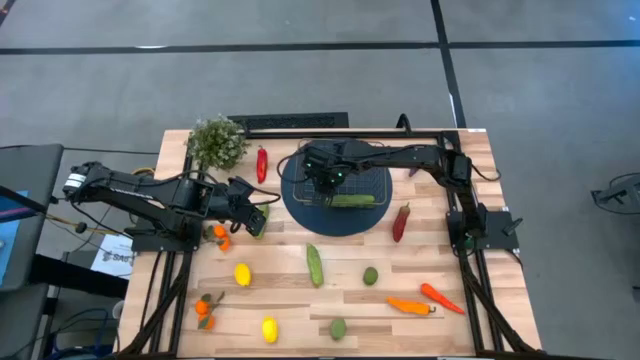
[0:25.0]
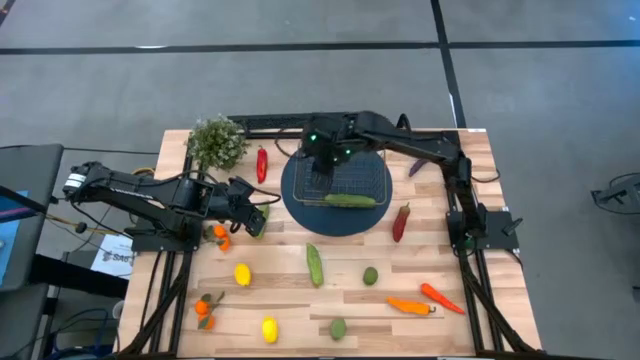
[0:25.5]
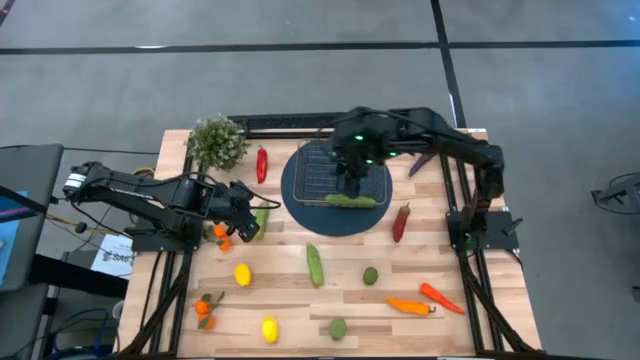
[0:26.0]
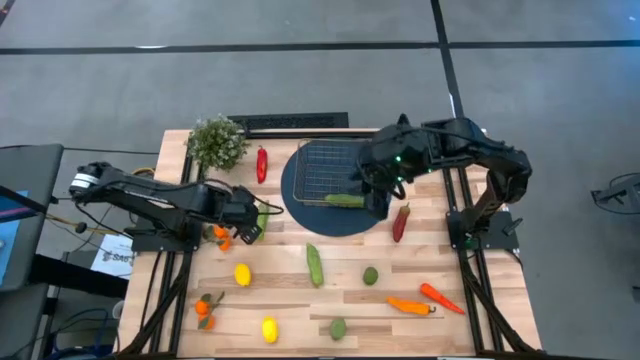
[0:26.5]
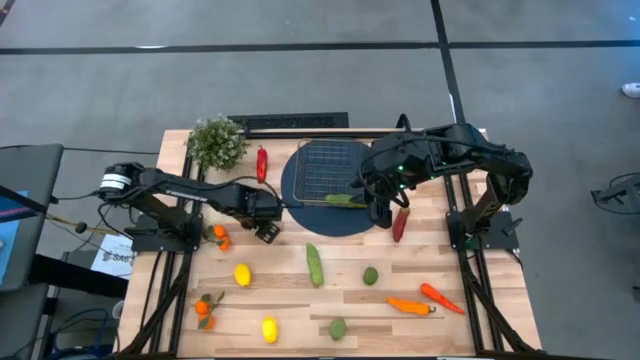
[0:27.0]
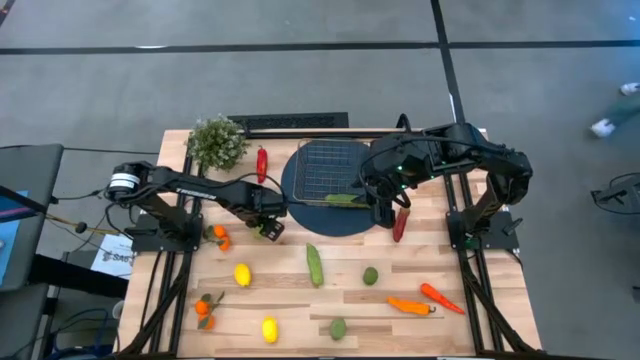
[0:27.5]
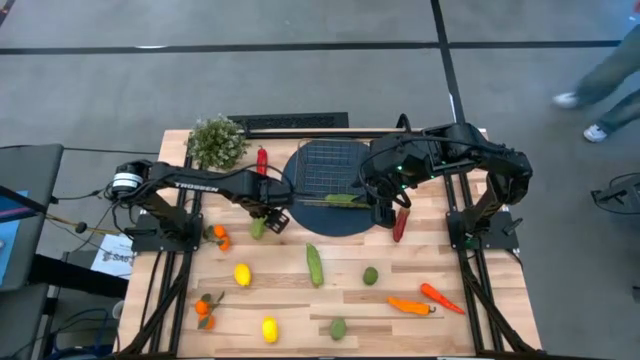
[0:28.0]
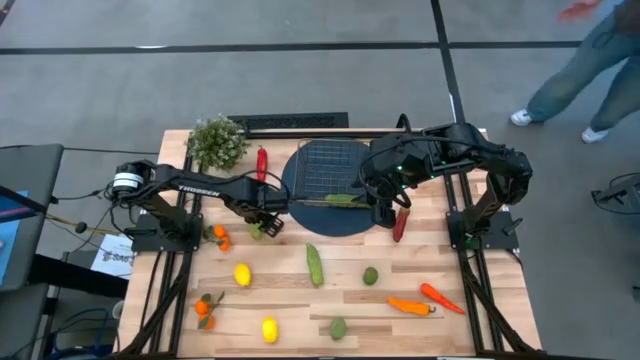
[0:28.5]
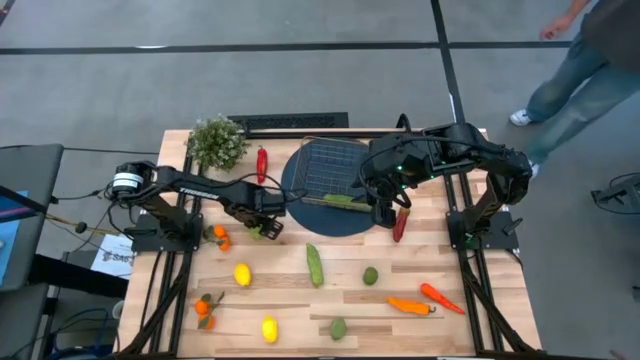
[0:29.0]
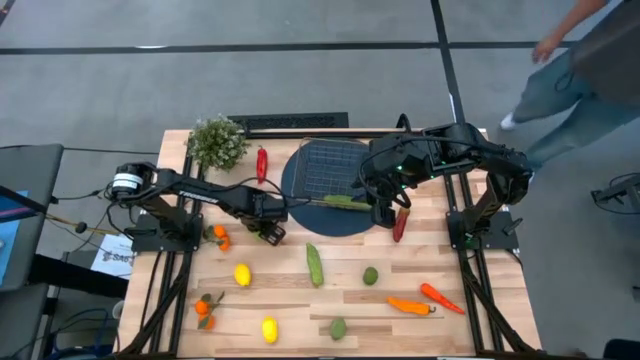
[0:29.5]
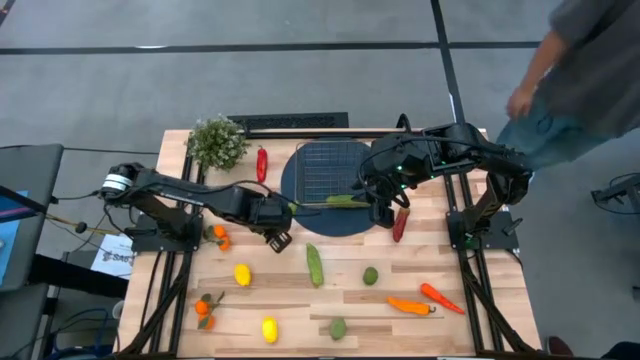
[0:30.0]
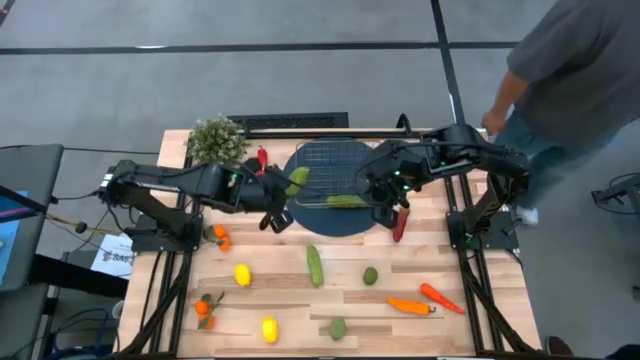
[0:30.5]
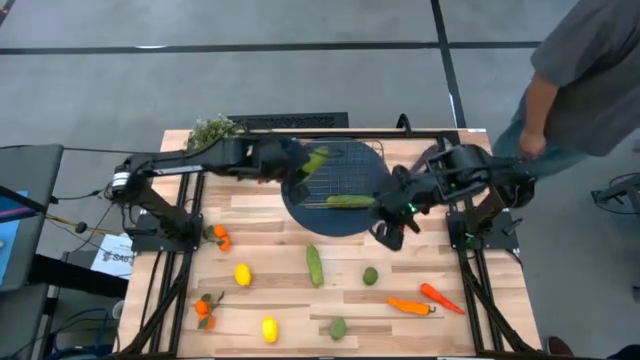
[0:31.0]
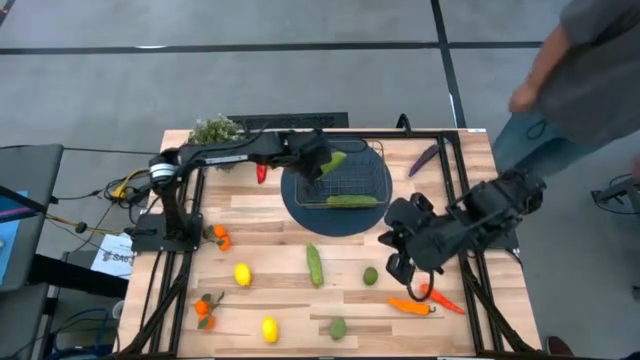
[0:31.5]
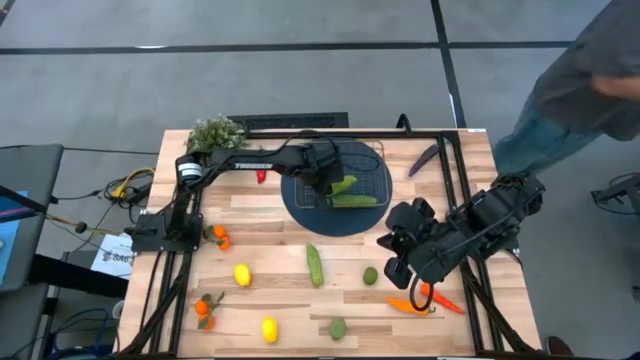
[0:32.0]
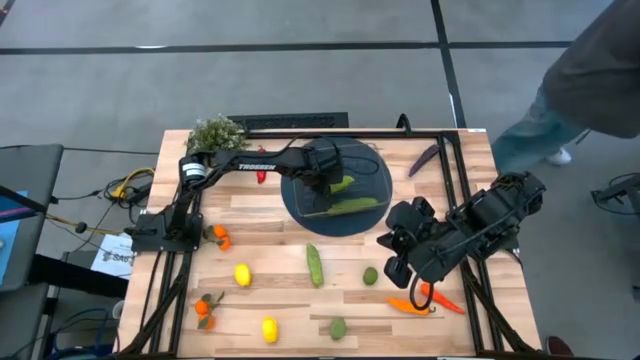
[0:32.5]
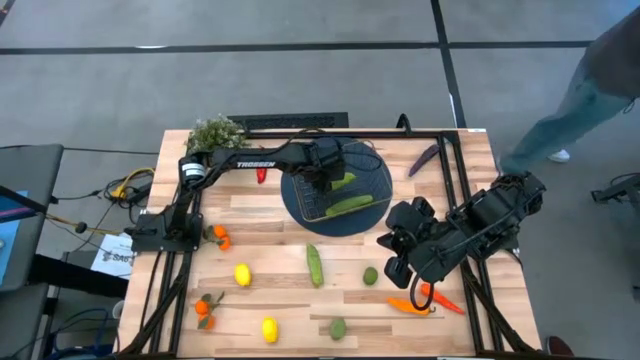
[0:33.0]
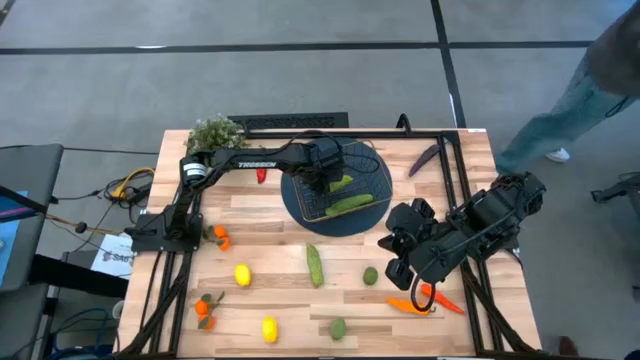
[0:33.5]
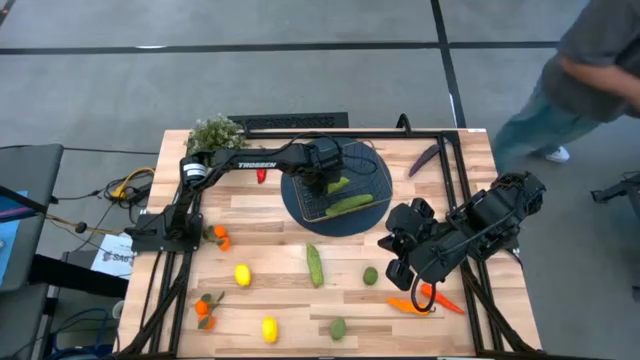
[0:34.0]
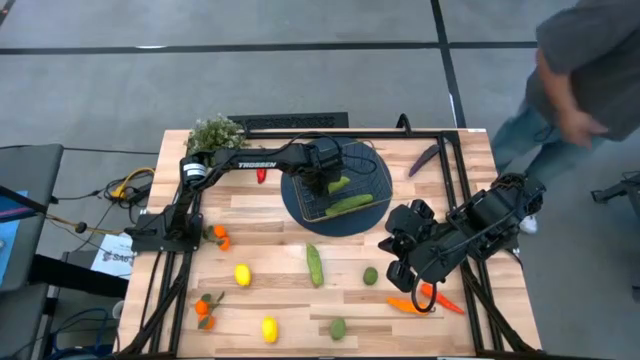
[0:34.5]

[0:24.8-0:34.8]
Task: Build produce basket
Put the top cucumber into the wire basket

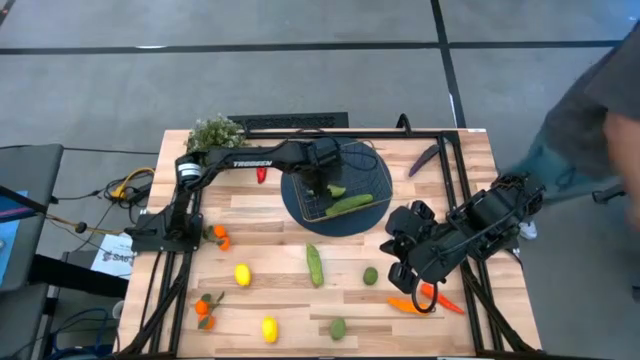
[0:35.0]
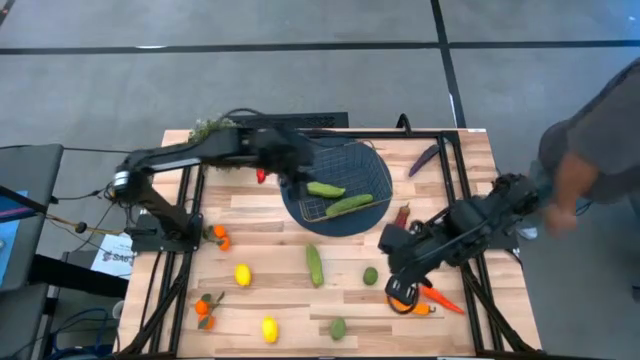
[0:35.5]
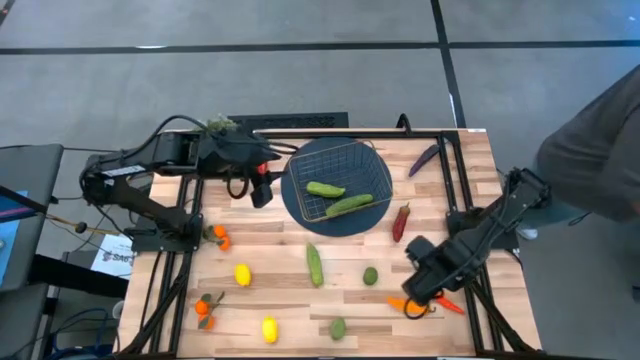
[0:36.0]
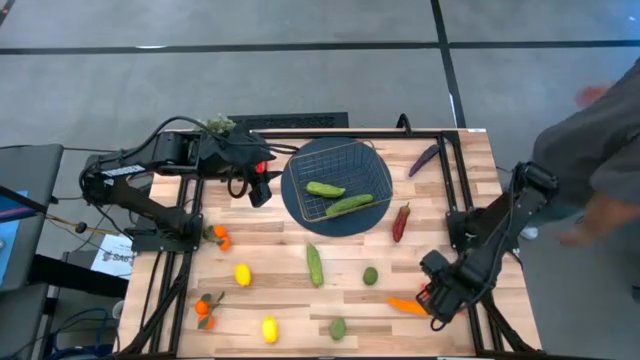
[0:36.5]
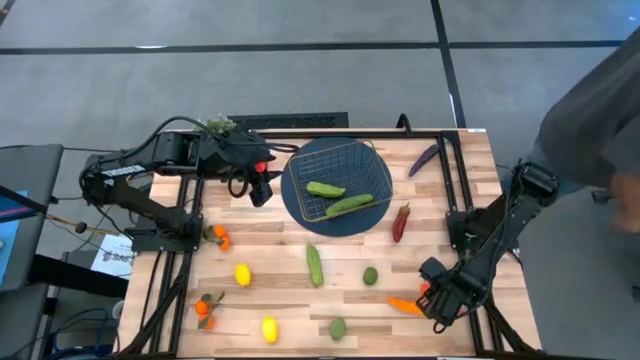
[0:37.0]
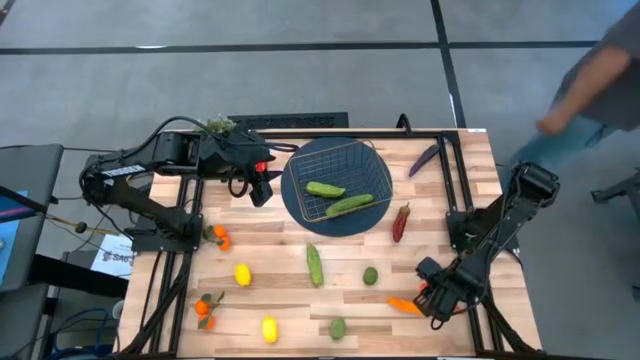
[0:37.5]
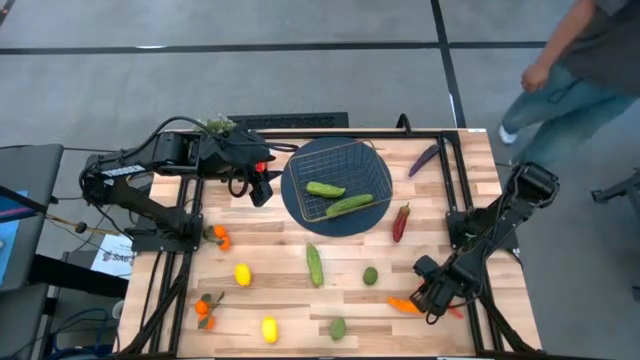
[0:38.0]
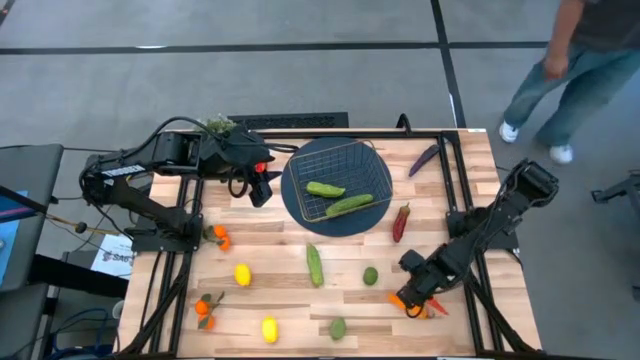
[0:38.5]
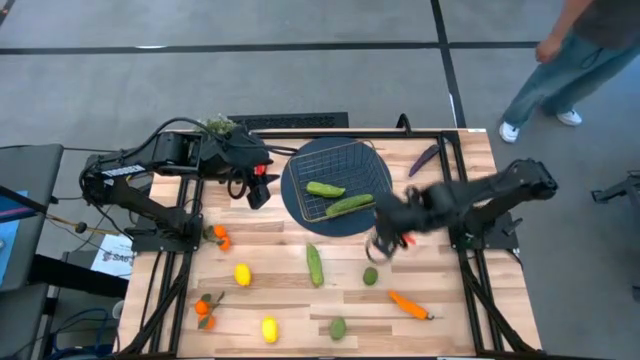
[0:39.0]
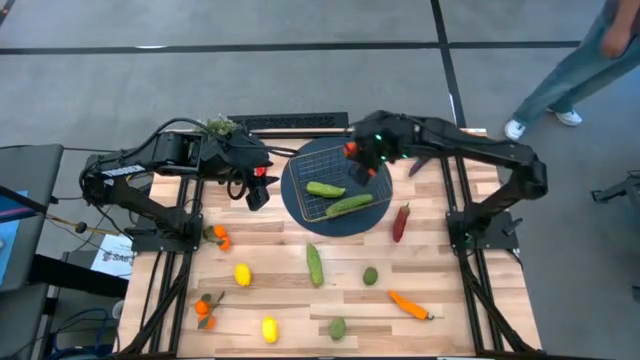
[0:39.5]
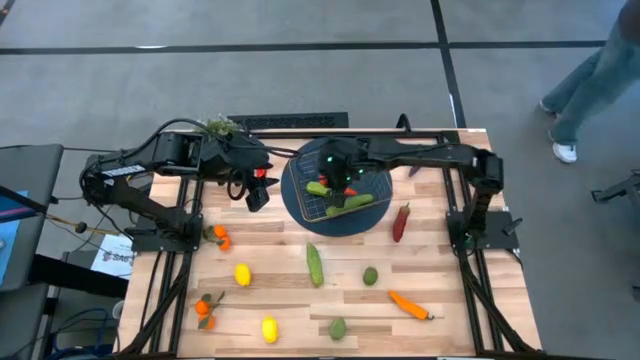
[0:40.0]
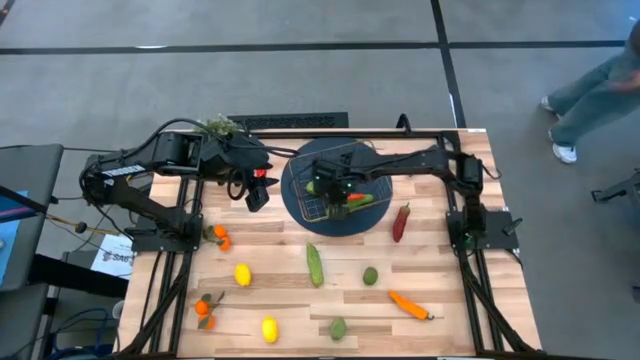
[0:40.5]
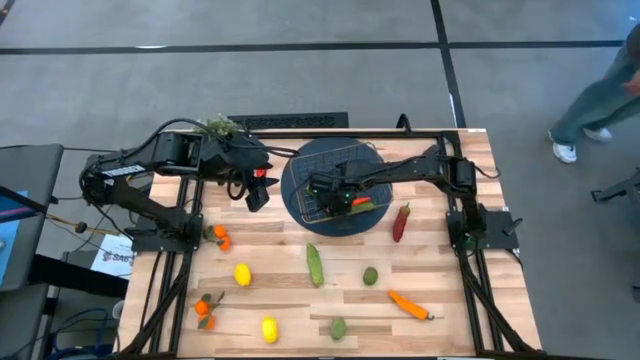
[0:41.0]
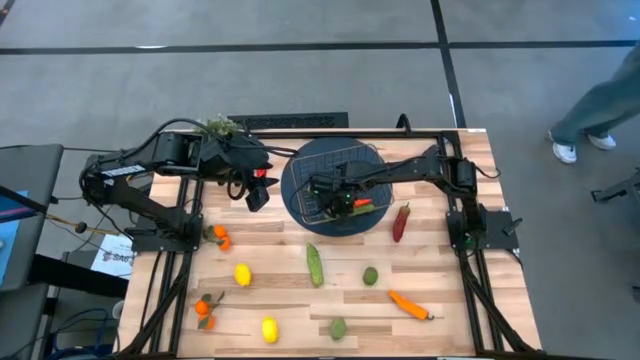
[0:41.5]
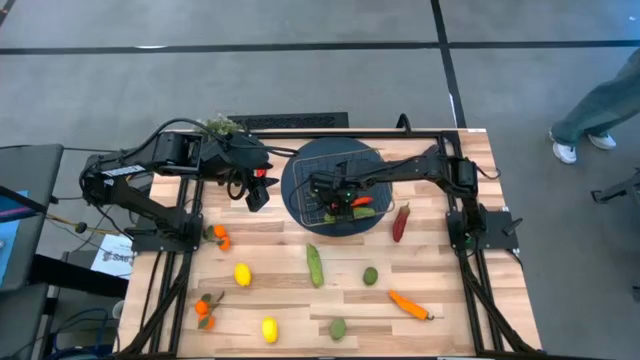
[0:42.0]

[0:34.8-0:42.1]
Put the carrot into the wire basket

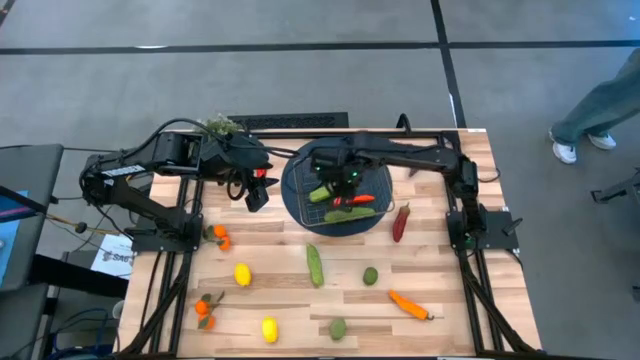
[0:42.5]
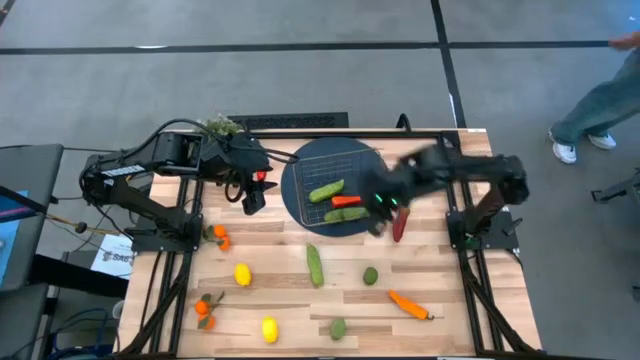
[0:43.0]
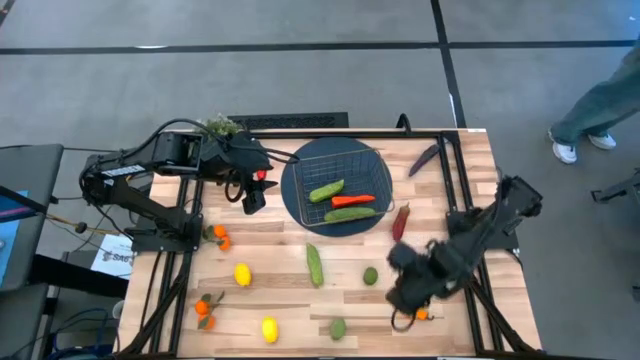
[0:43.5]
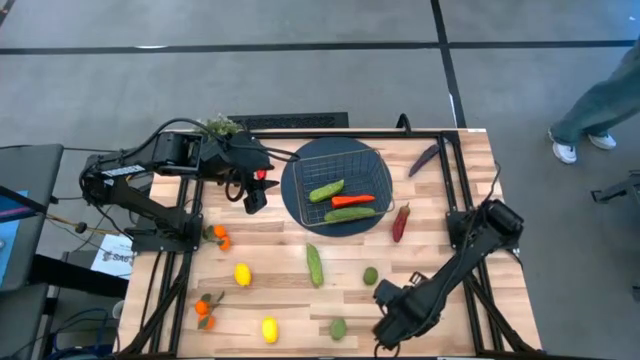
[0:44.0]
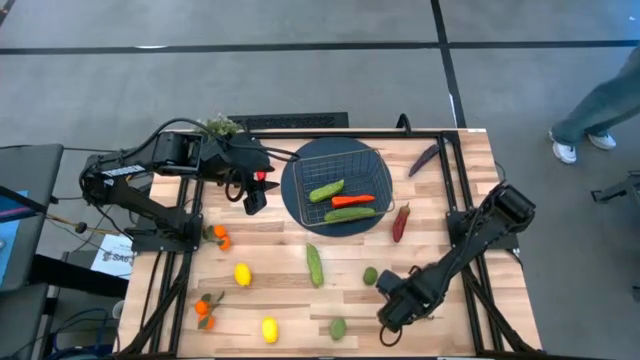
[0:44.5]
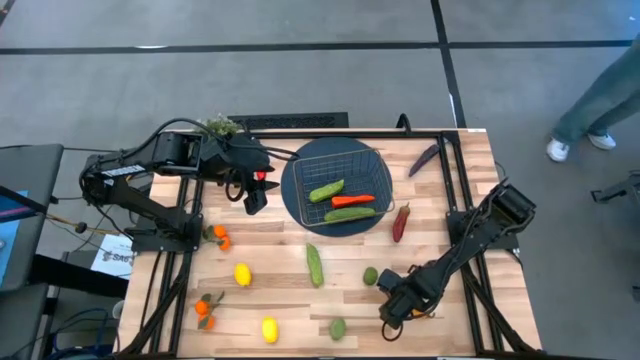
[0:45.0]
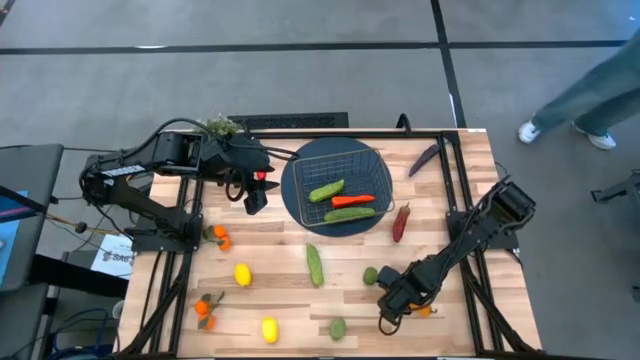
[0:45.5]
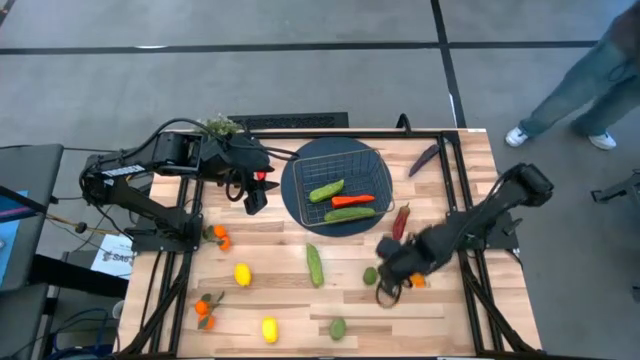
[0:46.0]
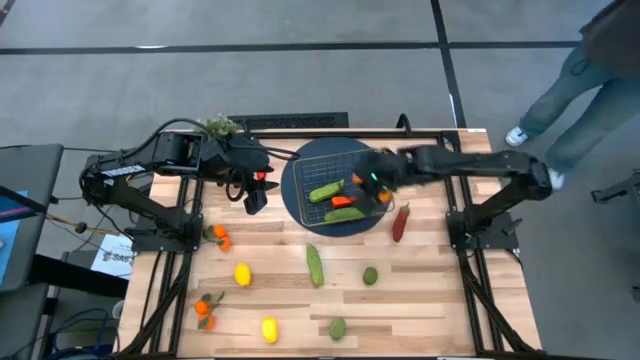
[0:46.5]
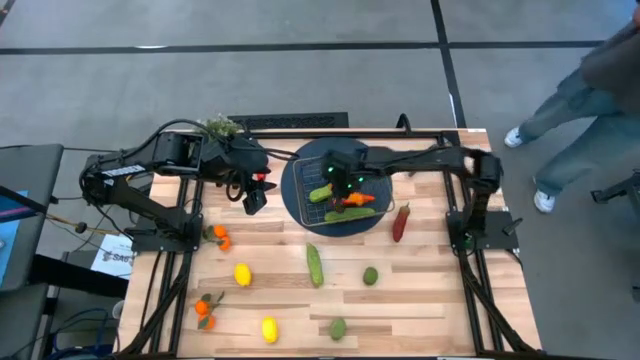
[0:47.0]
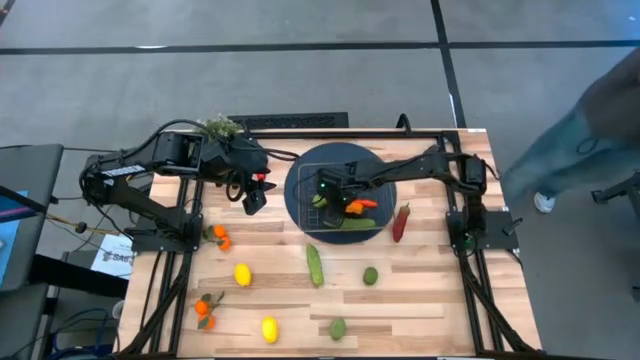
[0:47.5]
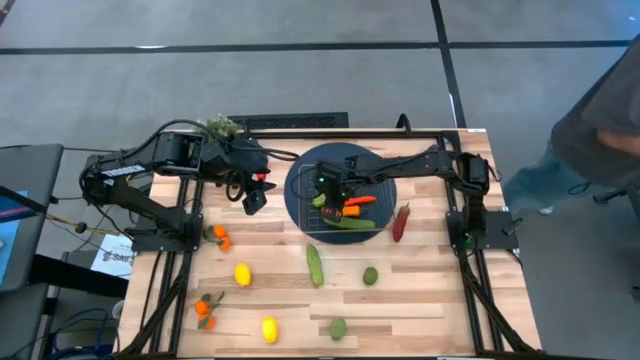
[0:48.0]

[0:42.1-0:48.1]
Put the orange chili pepper into the wire basket
